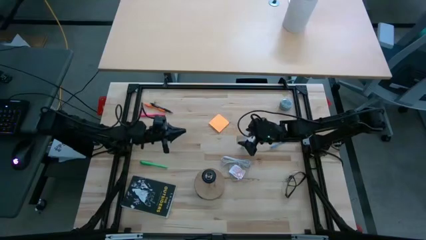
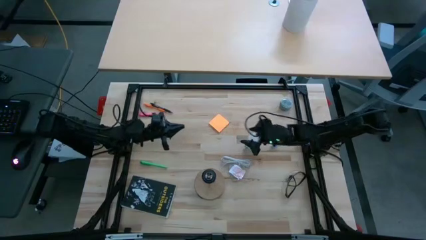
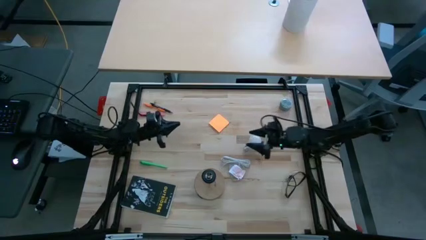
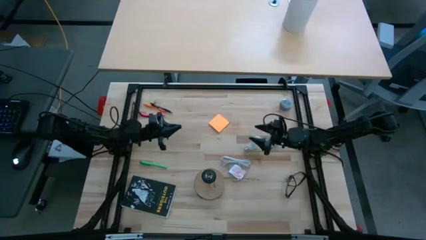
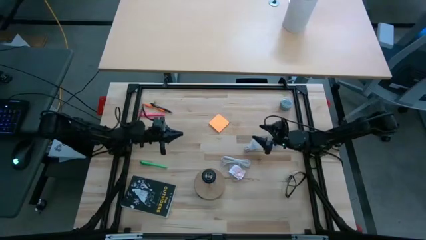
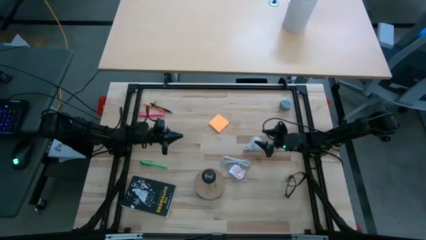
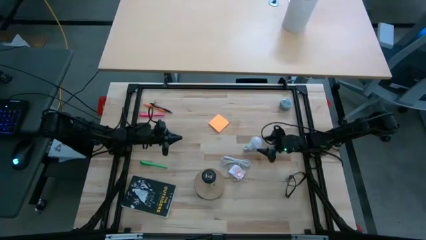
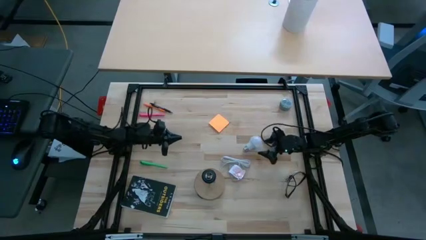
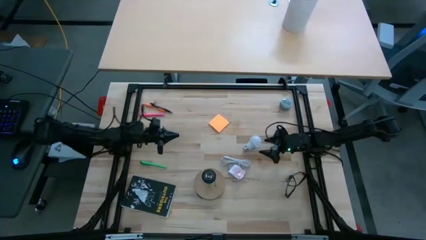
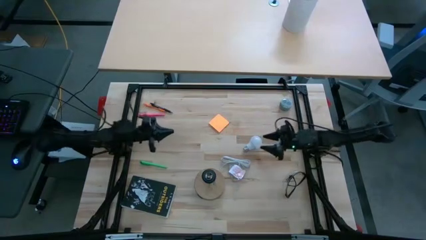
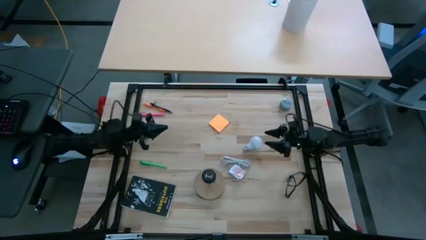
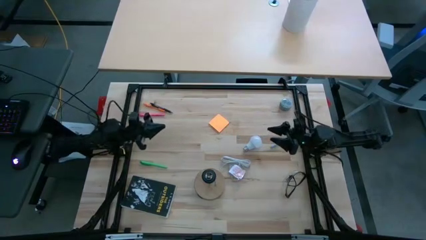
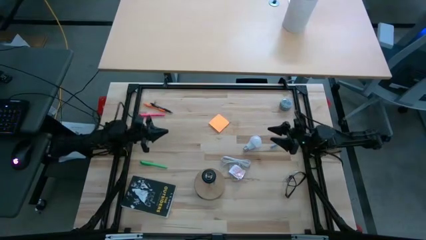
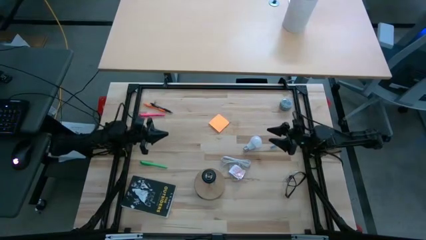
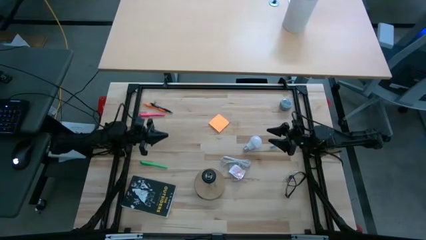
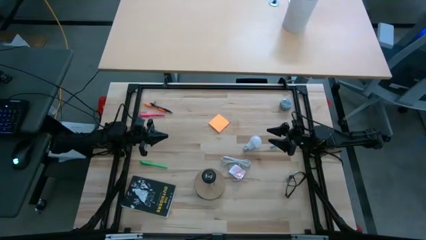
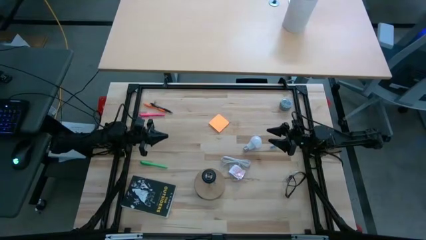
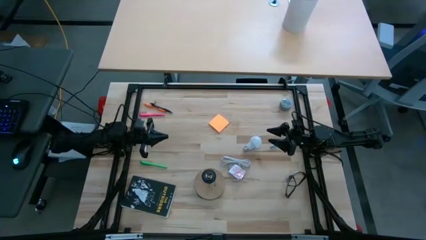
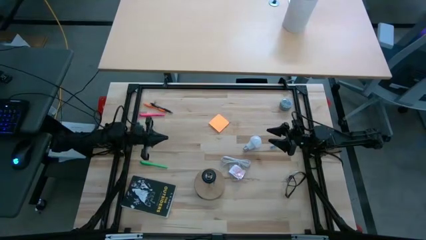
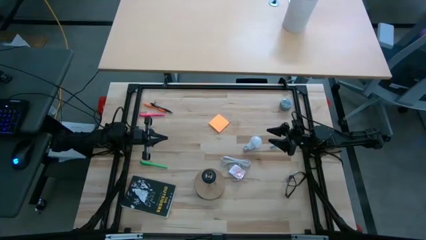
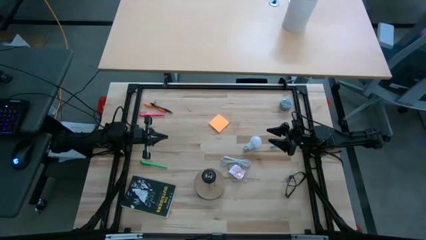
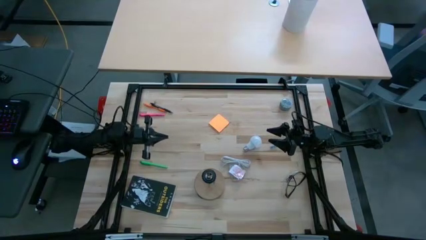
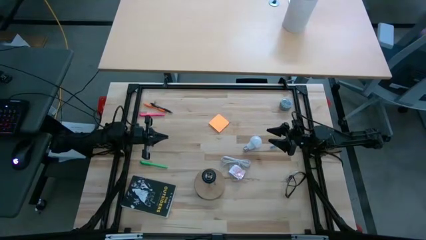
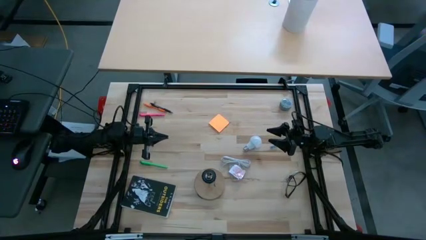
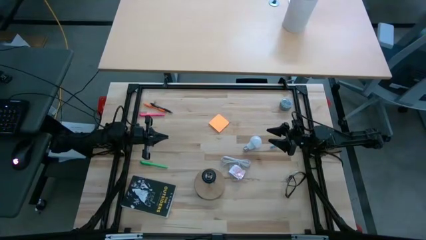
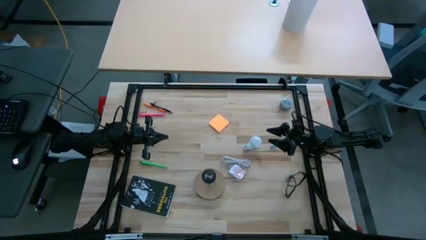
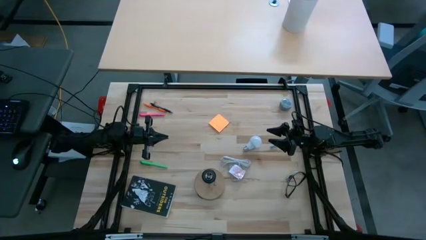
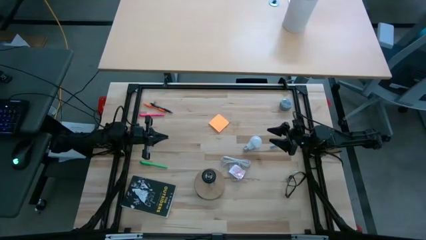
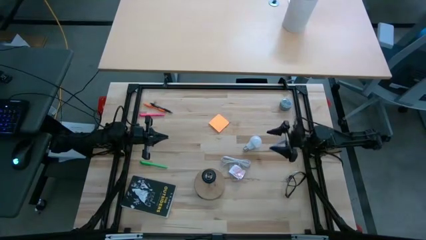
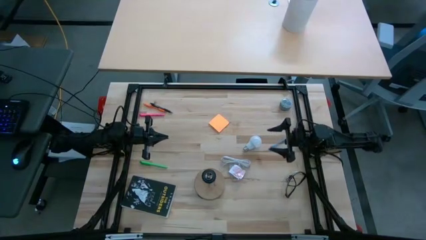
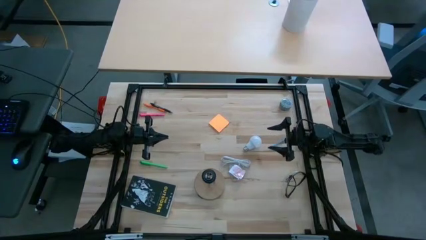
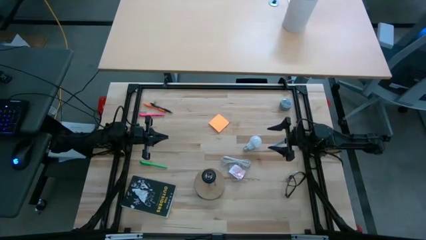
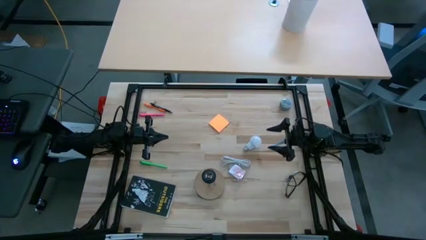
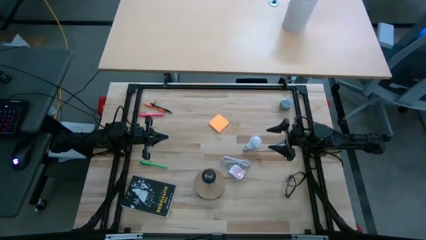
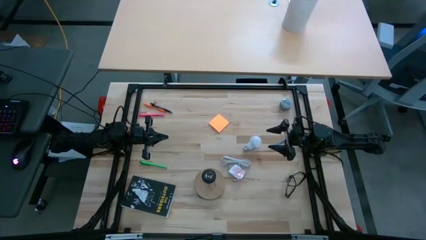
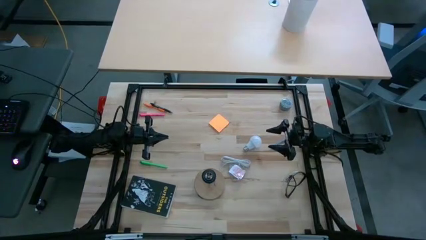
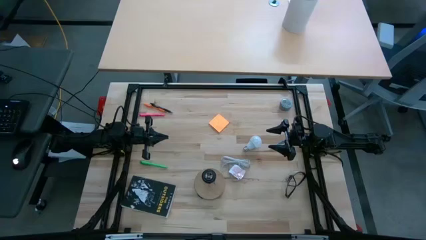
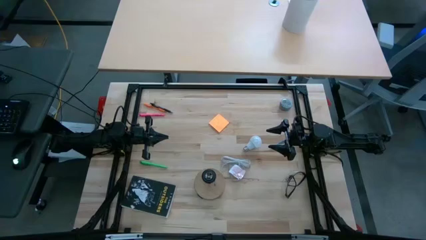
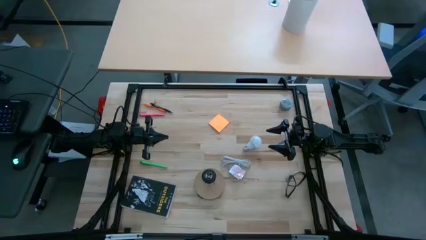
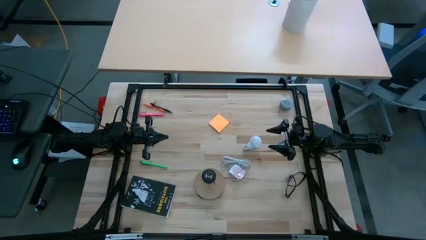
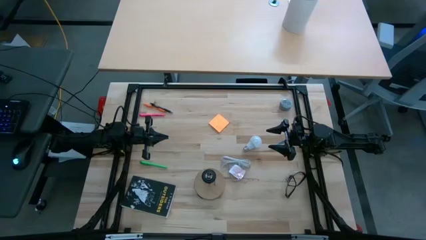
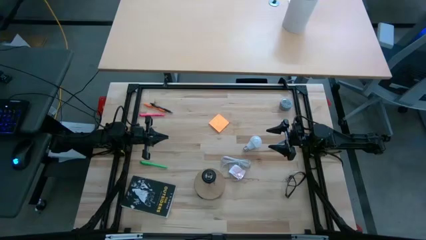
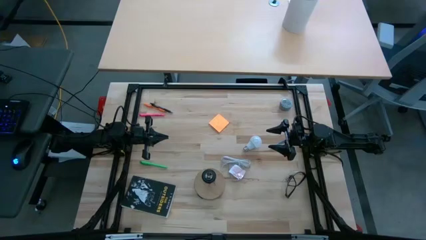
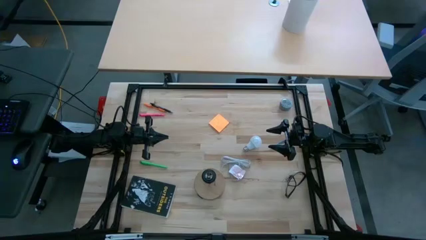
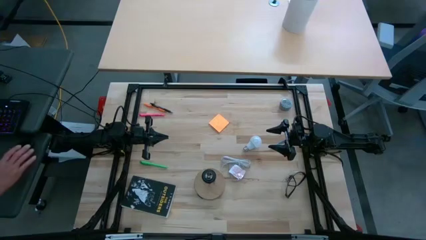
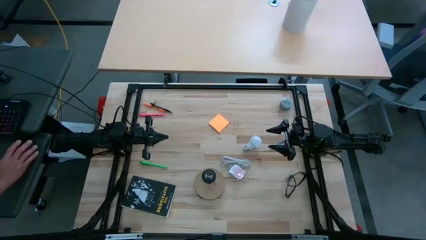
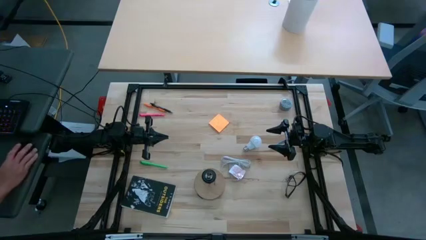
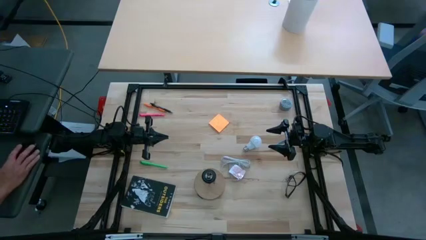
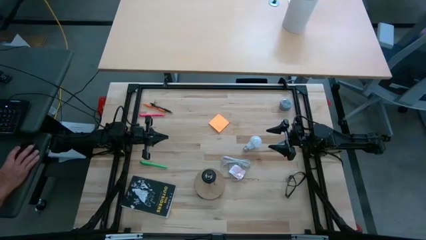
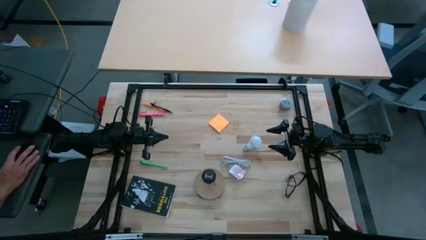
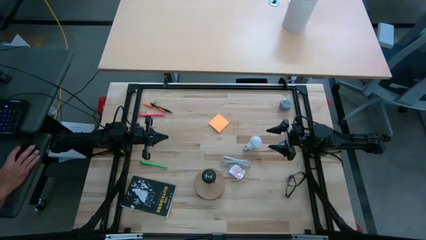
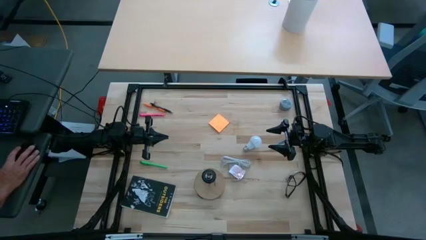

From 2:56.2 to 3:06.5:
Task: Screw lightbulb
Return to Home Position
